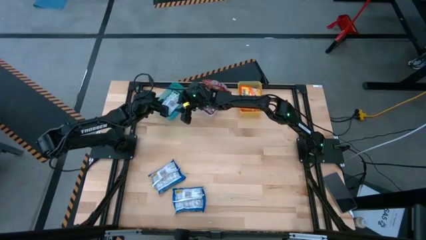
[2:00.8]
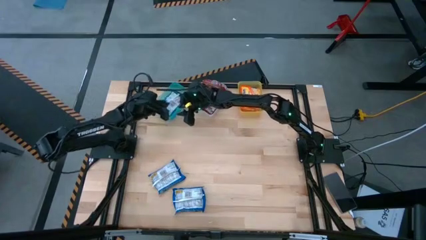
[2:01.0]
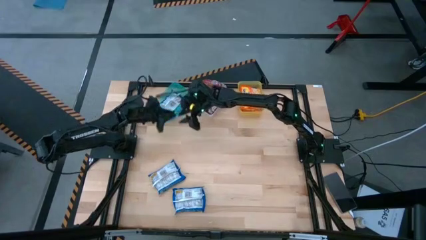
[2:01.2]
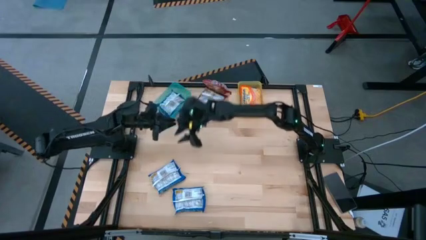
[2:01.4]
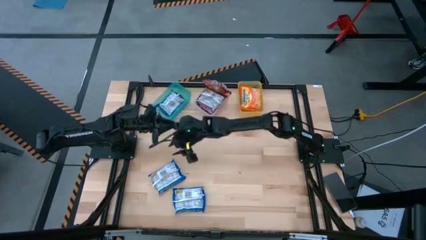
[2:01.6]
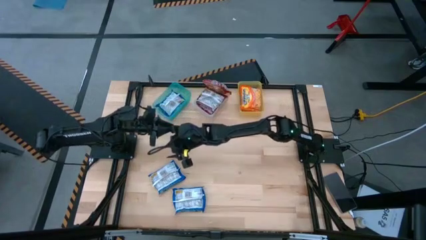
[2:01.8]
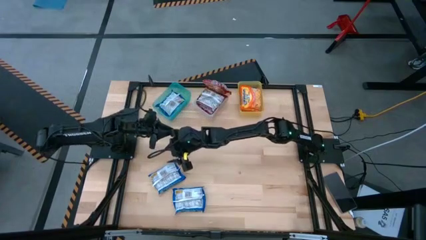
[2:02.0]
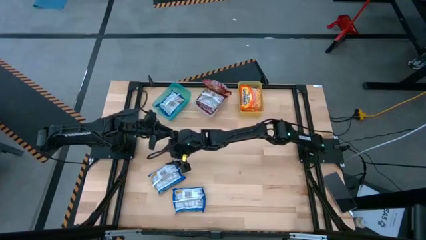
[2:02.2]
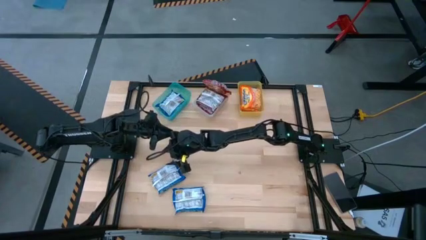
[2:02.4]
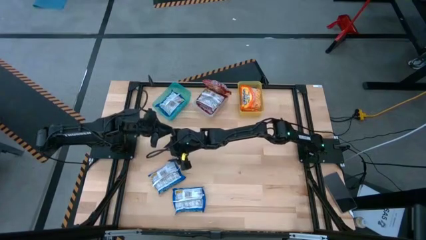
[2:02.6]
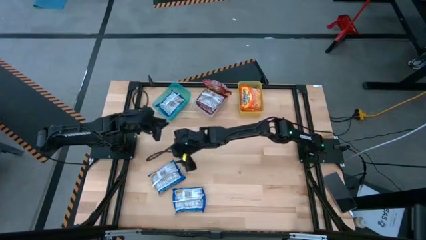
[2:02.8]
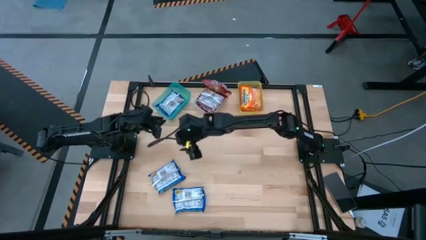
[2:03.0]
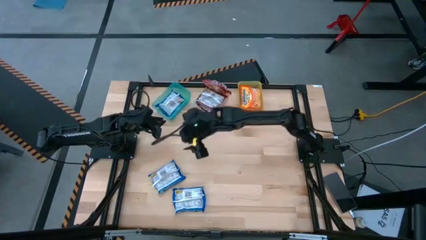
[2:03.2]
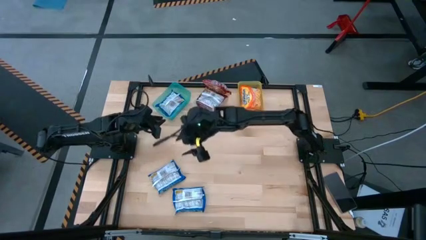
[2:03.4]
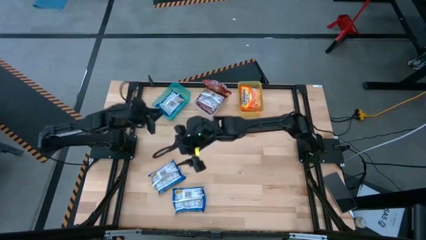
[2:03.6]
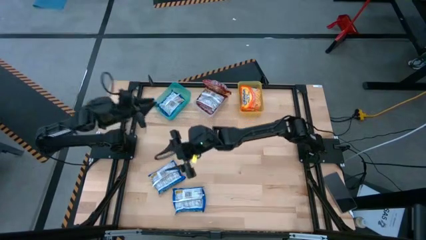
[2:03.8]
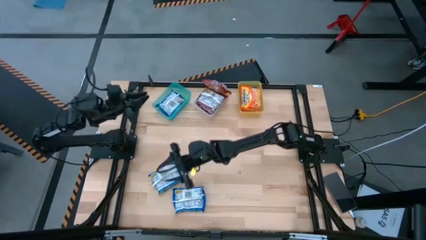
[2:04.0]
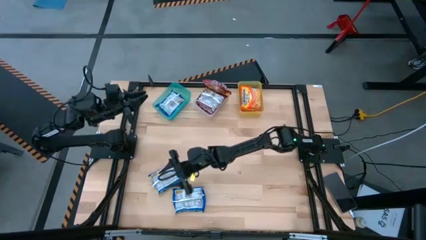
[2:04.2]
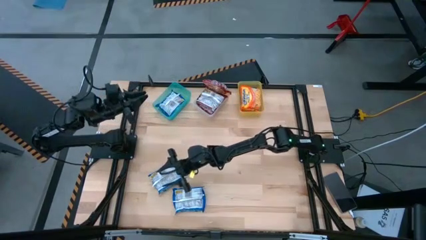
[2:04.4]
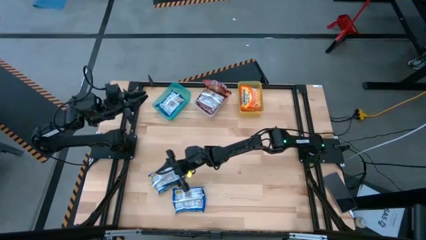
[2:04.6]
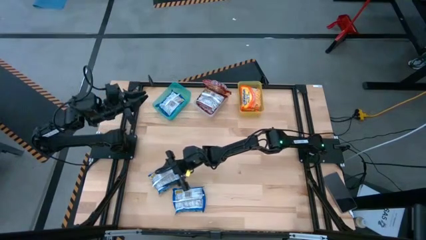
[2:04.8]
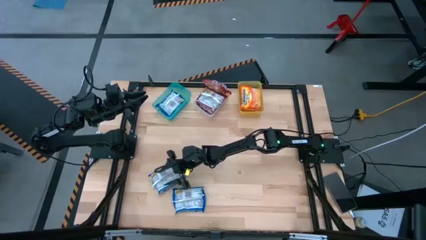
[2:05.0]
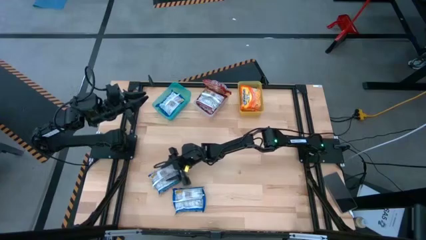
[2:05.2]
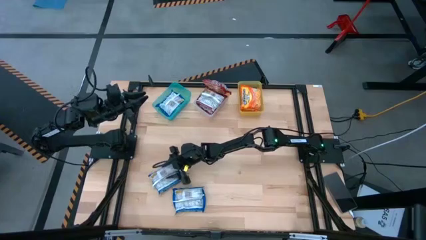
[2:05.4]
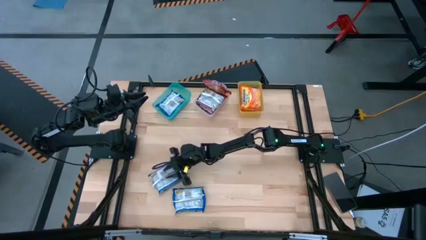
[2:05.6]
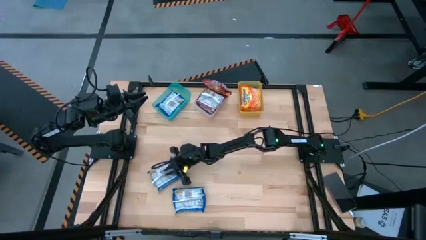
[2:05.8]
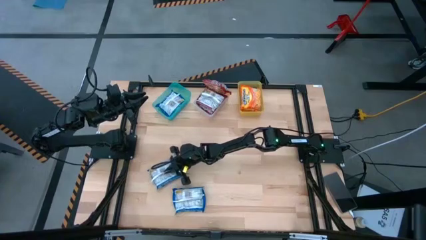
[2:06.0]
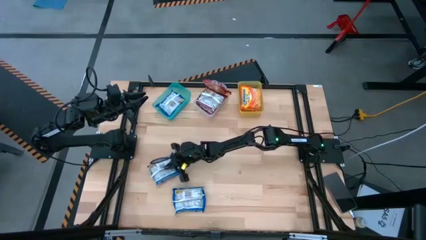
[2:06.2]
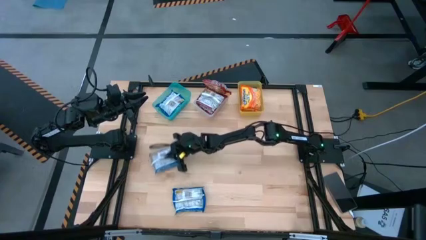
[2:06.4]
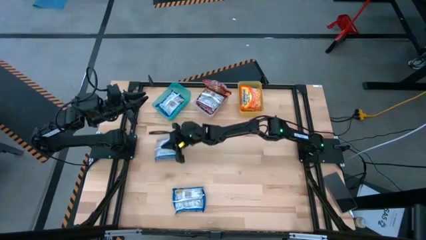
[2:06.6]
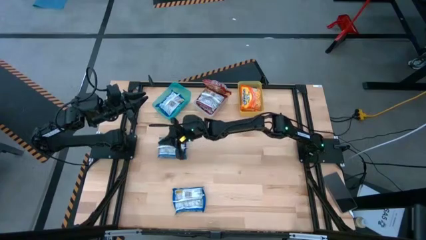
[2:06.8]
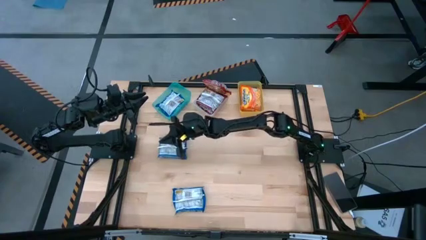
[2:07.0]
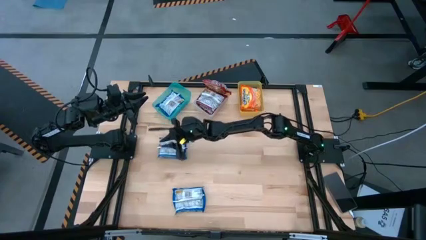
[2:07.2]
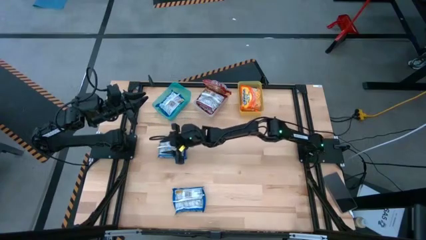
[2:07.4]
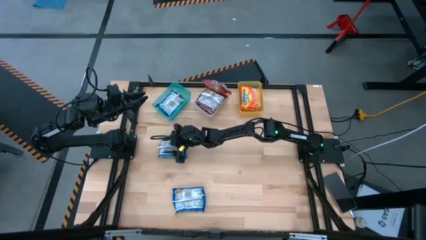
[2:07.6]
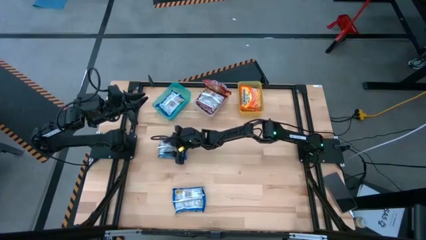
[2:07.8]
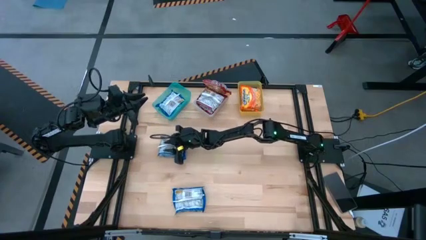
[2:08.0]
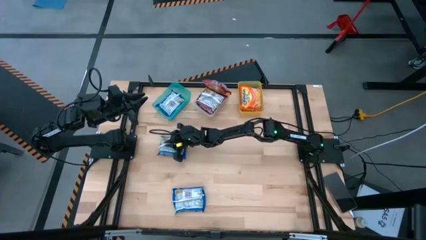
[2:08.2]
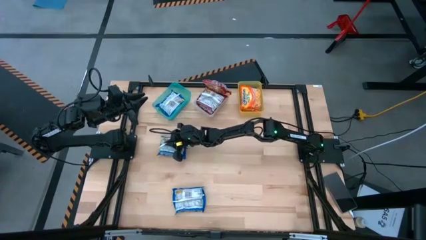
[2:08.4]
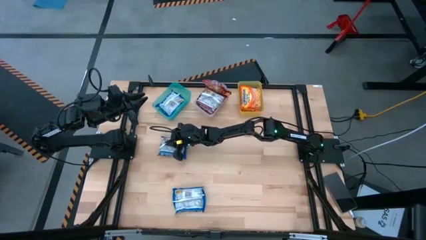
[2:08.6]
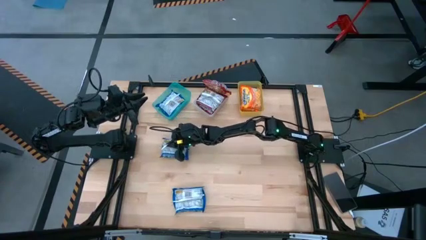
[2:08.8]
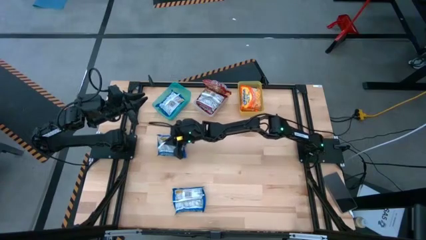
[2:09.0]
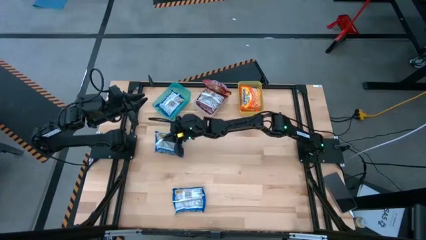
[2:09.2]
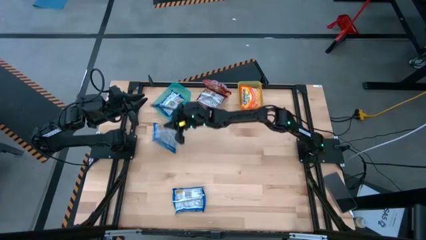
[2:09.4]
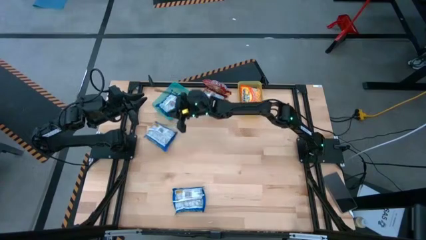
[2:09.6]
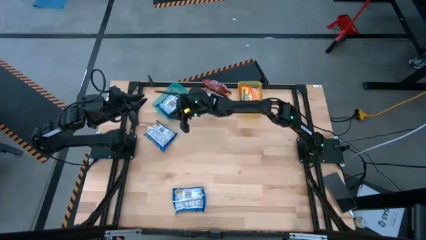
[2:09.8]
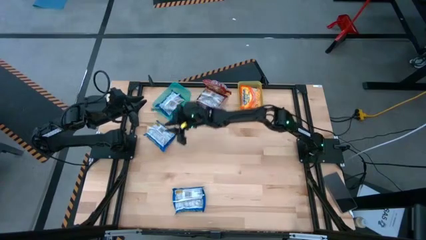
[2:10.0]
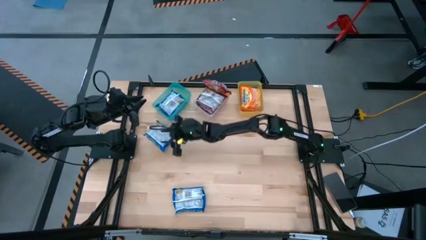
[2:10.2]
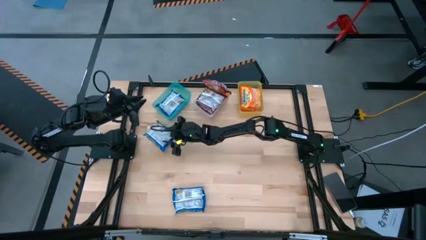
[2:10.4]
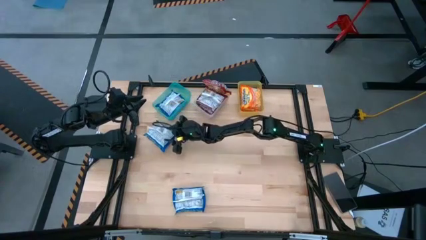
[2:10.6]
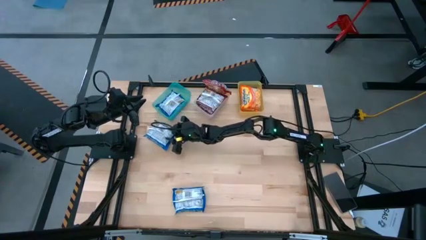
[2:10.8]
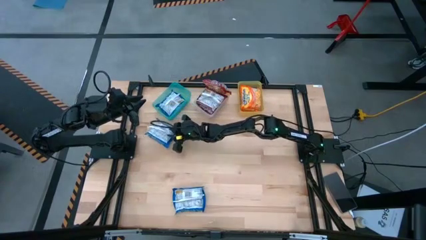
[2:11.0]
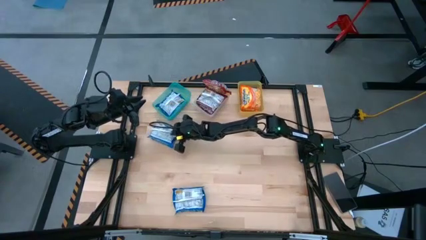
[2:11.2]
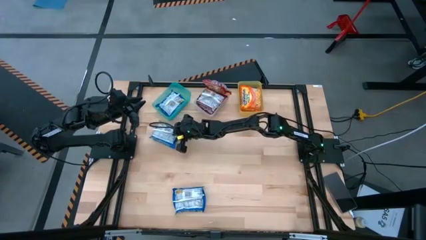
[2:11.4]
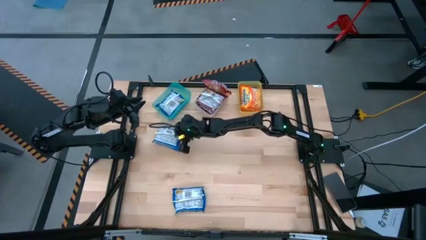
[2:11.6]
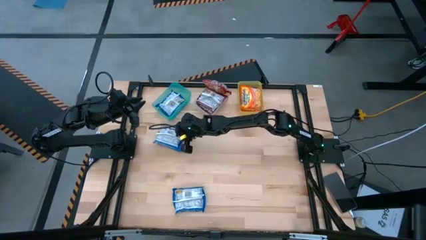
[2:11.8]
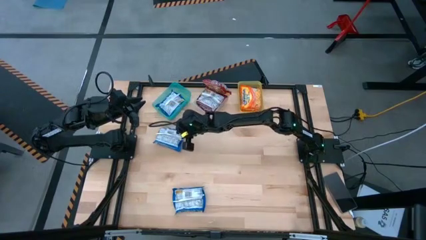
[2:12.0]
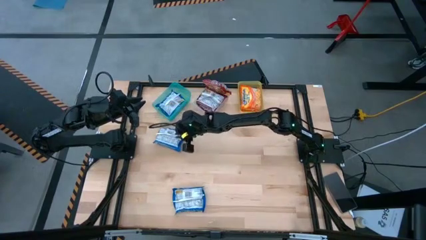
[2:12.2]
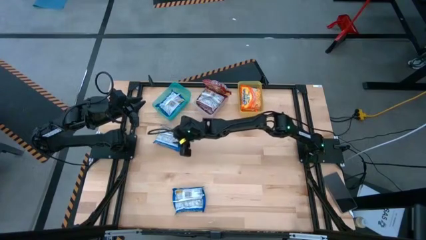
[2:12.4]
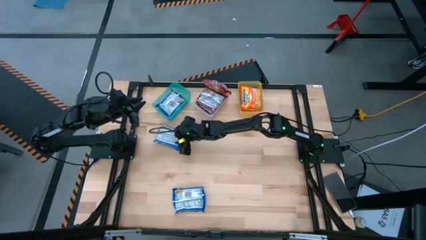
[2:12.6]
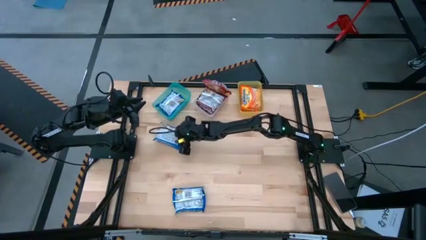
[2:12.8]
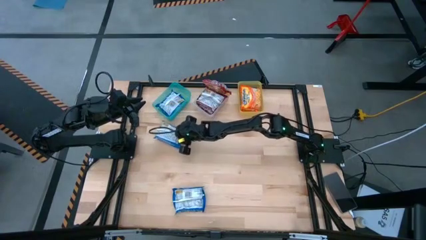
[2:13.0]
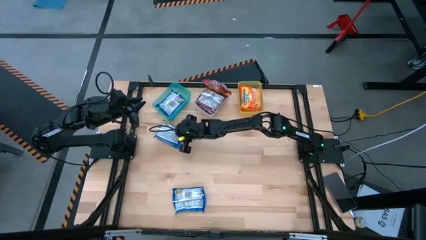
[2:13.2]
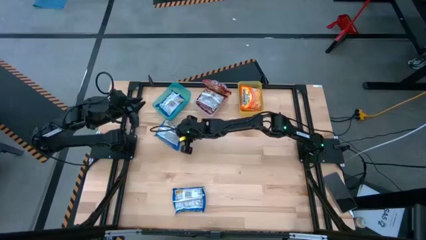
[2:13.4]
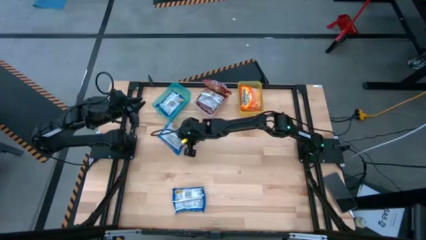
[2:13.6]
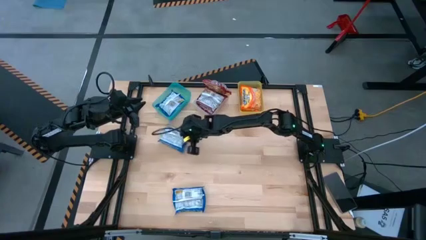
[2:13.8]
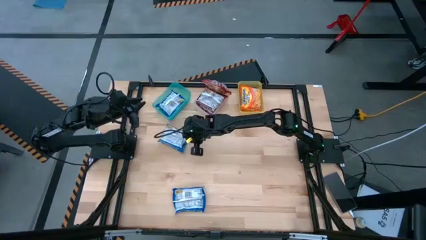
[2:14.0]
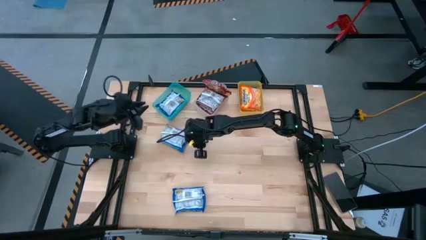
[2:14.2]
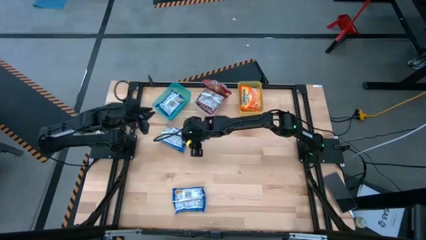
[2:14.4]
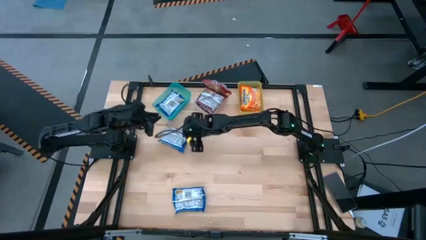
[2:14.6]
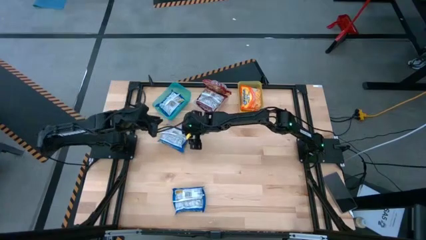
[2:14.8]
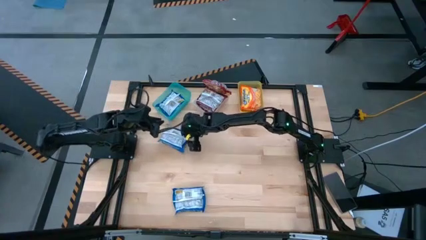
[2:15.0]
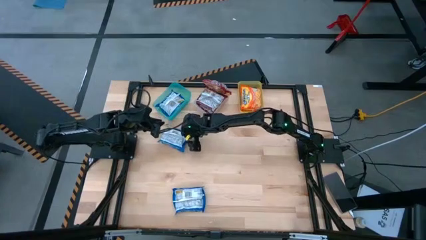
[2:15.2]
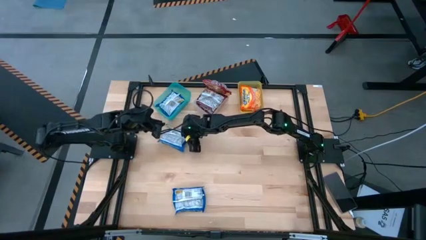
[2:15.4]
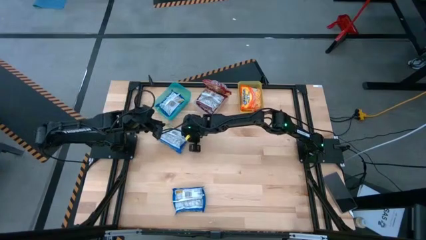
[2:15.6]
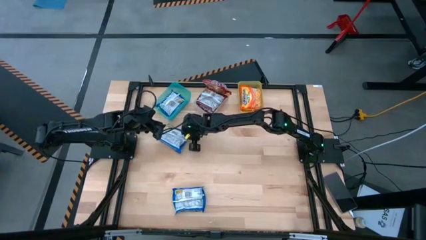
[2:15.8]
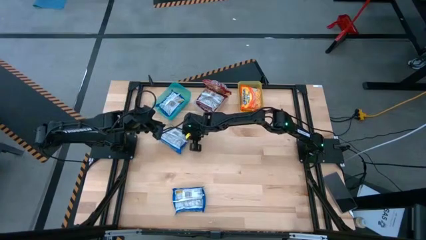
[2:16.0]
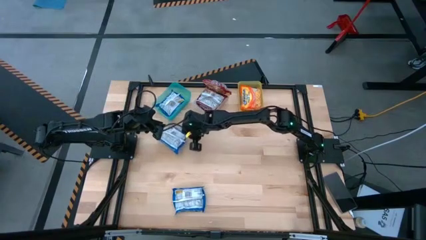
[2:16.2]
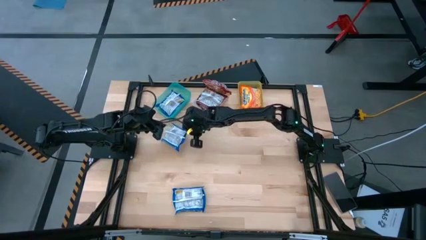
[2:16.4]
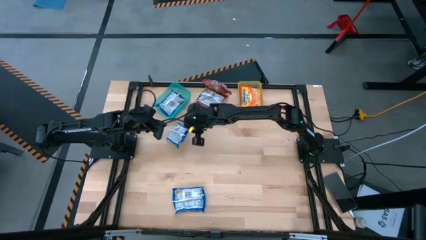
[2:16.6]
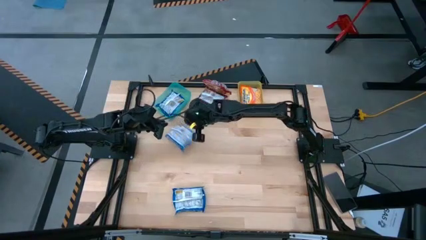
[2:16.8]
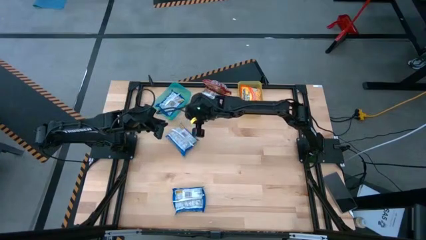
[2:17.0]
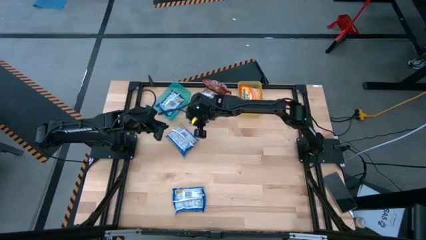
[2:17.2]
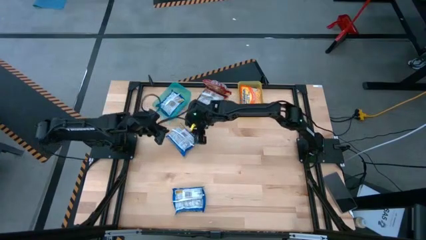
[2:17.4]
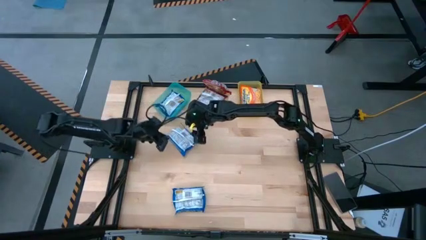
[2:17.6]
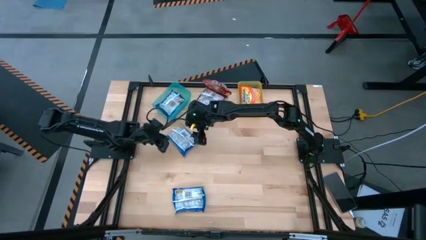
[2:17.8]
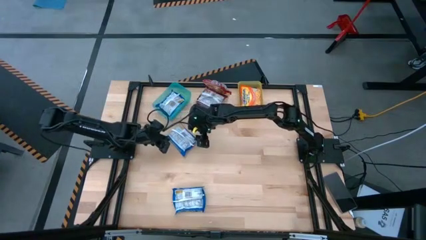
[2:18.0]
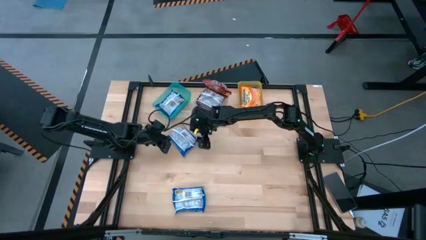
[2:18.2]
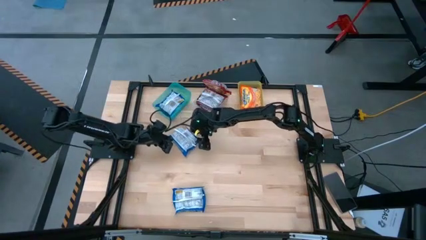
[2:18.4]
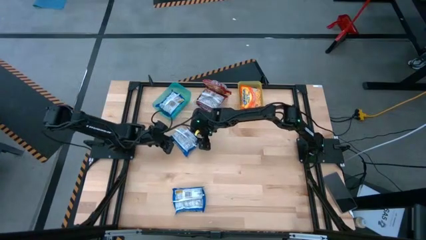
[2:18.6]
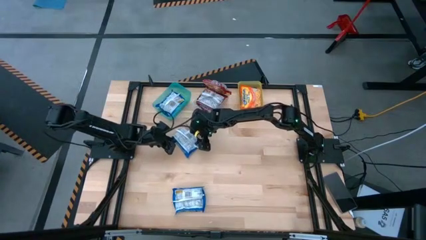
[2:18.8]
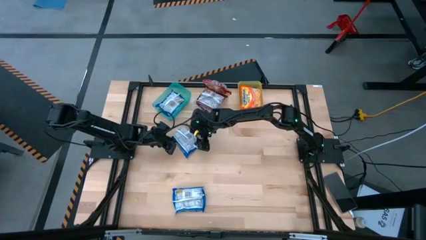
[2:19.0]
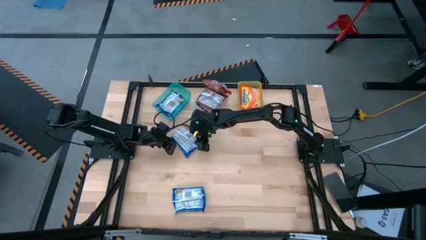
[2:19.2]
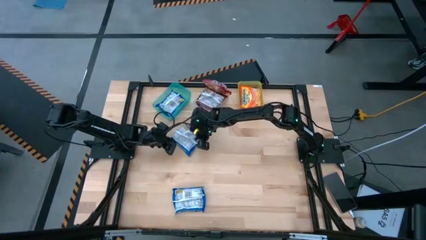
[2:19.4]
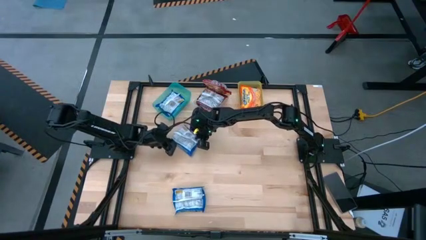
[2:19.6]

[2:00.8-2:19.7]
Task: Sort Maruchan noodles
Put the top blue noodle pack into the blue bin
